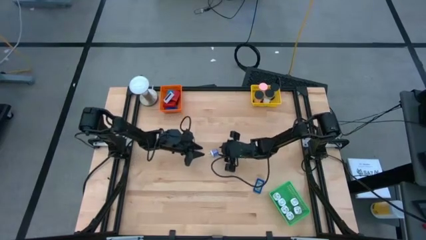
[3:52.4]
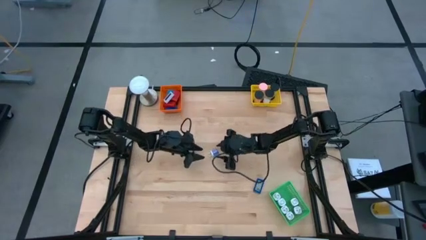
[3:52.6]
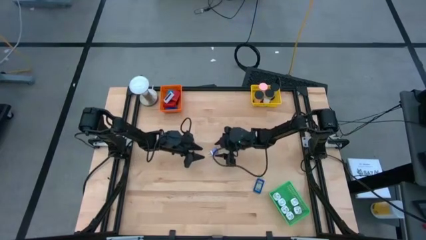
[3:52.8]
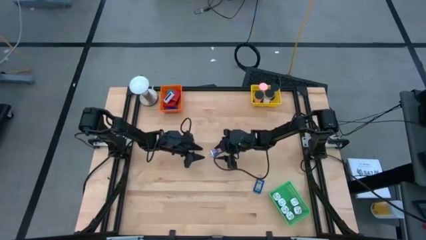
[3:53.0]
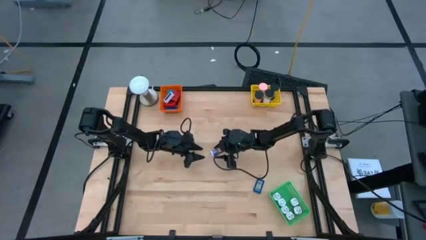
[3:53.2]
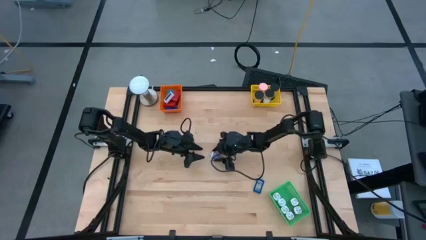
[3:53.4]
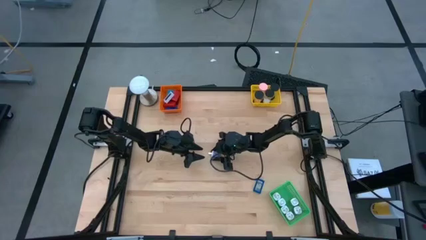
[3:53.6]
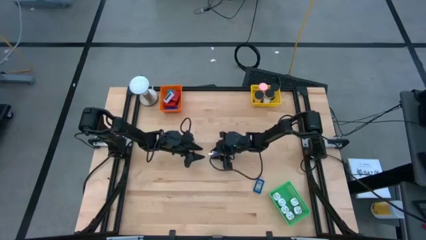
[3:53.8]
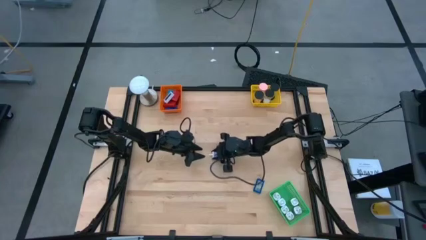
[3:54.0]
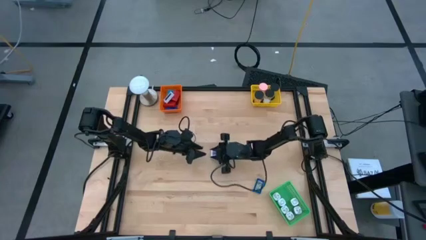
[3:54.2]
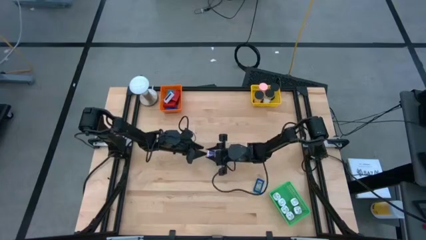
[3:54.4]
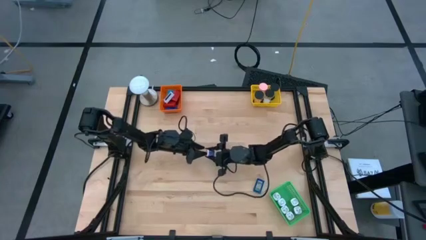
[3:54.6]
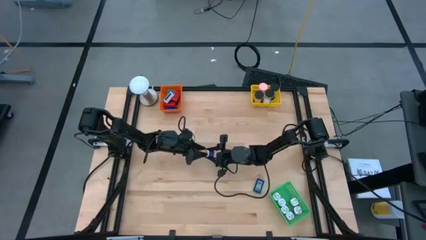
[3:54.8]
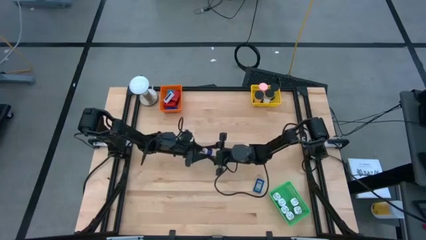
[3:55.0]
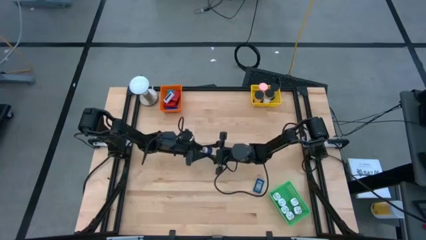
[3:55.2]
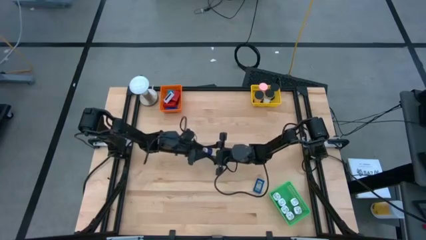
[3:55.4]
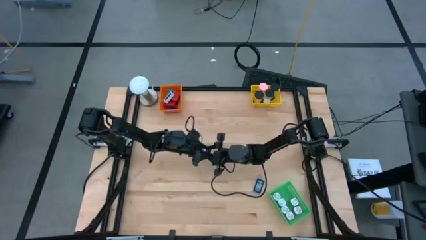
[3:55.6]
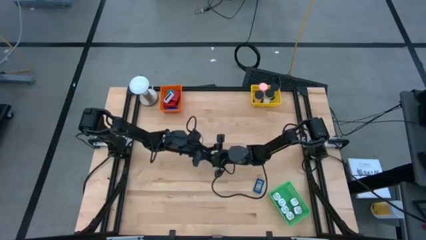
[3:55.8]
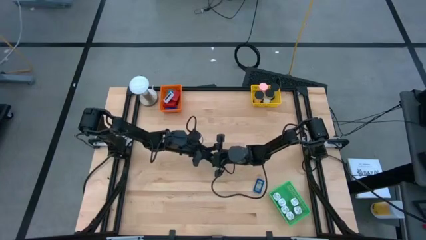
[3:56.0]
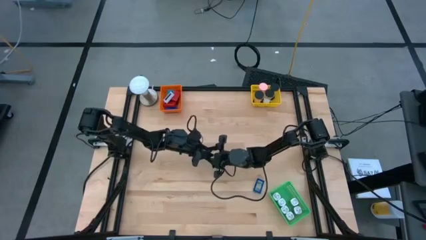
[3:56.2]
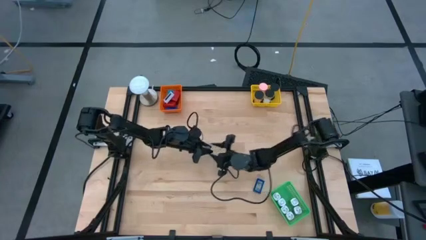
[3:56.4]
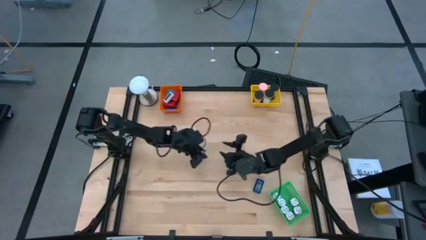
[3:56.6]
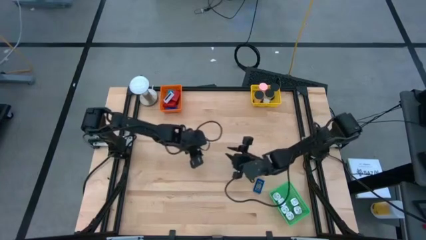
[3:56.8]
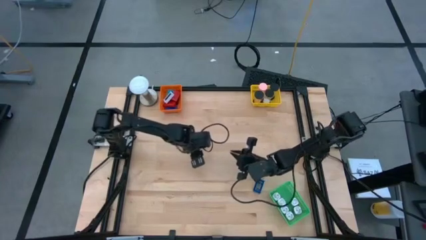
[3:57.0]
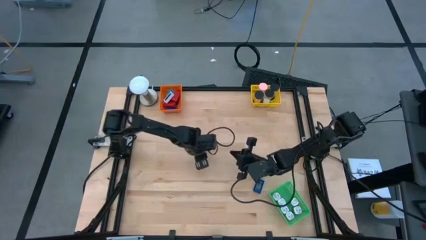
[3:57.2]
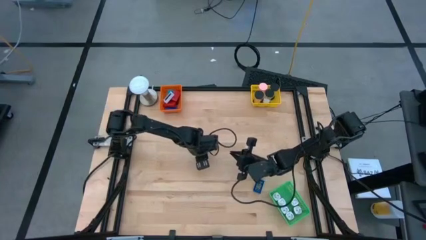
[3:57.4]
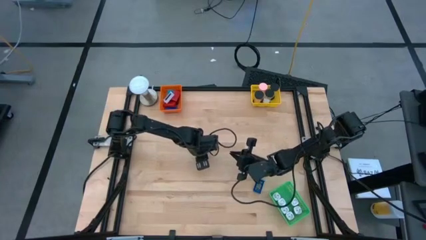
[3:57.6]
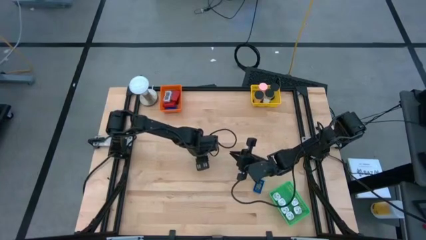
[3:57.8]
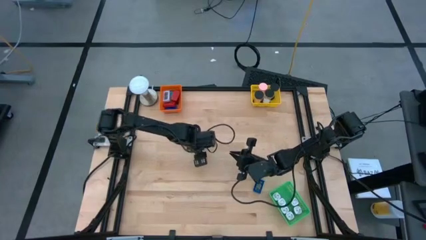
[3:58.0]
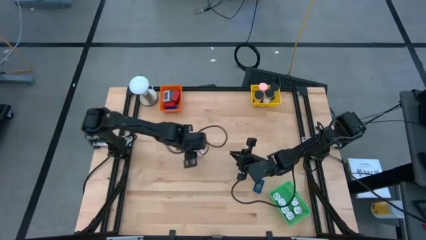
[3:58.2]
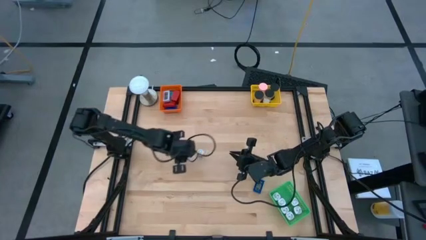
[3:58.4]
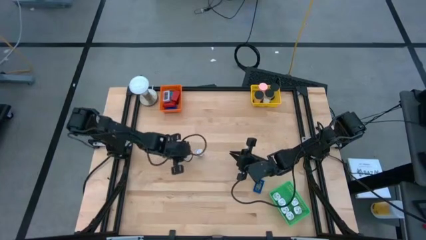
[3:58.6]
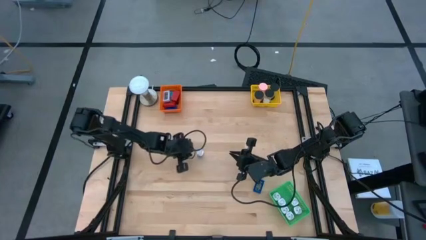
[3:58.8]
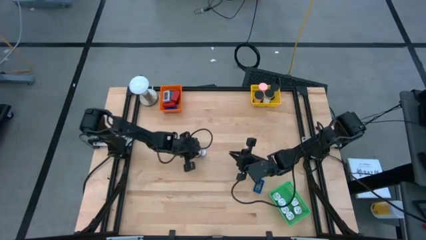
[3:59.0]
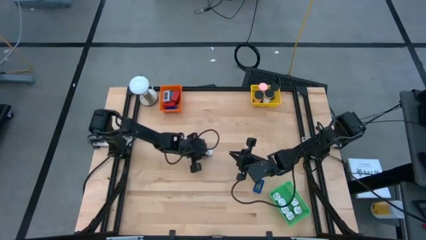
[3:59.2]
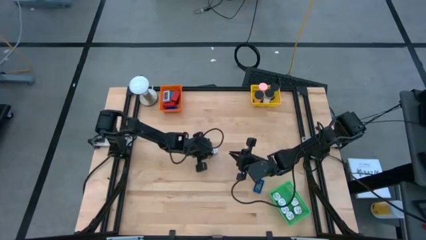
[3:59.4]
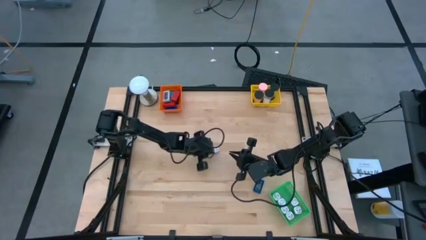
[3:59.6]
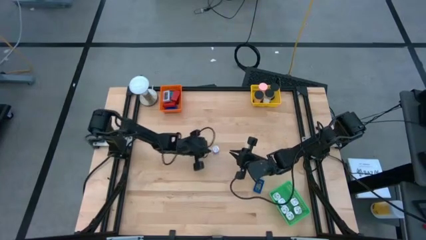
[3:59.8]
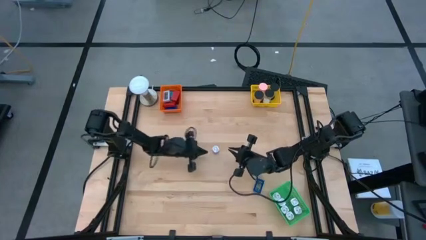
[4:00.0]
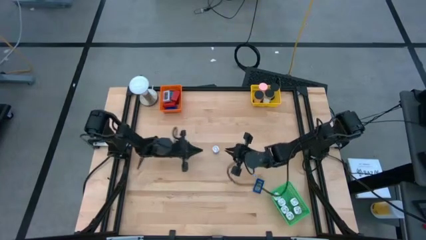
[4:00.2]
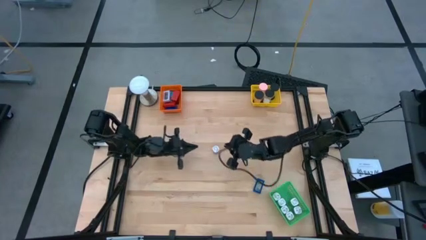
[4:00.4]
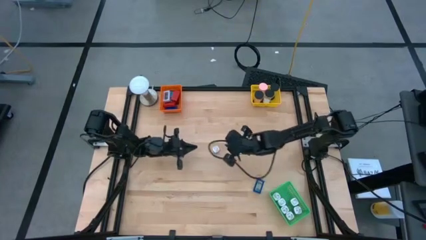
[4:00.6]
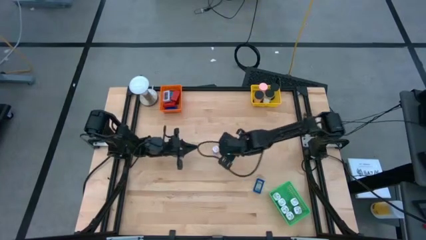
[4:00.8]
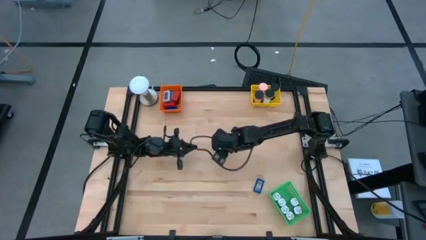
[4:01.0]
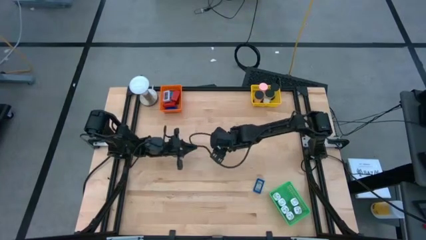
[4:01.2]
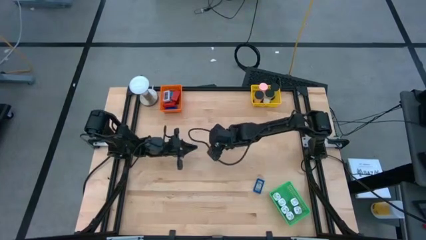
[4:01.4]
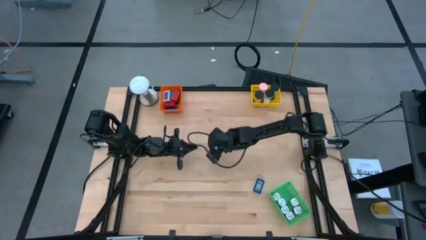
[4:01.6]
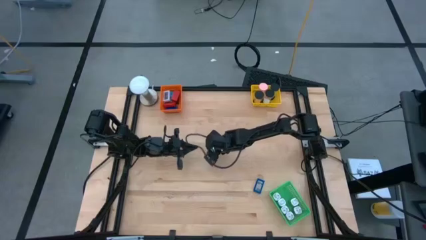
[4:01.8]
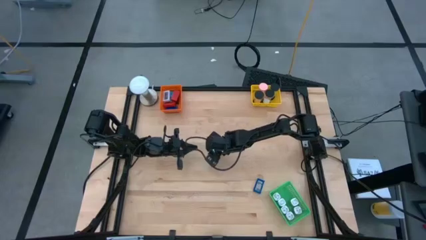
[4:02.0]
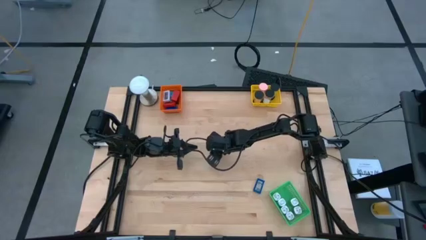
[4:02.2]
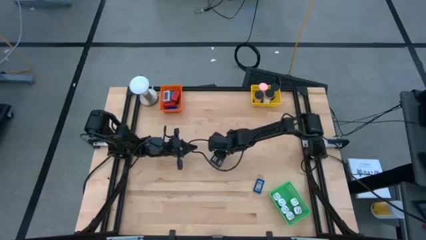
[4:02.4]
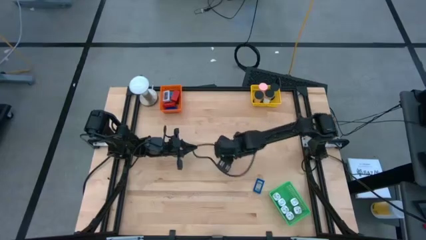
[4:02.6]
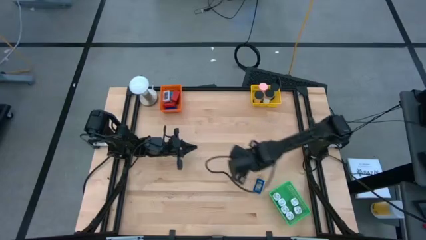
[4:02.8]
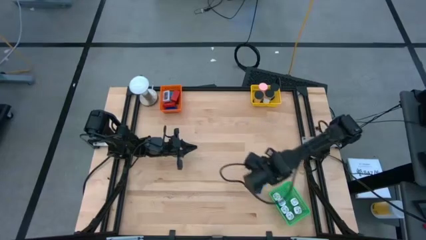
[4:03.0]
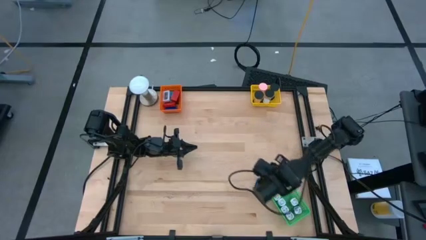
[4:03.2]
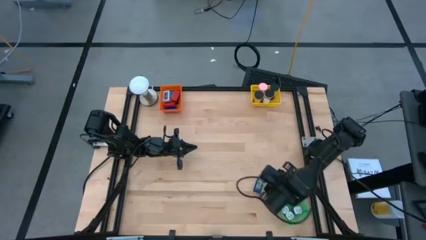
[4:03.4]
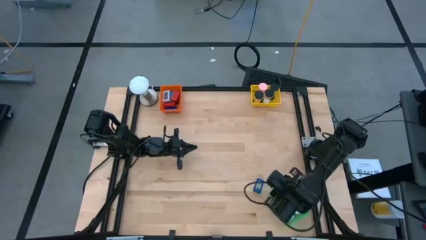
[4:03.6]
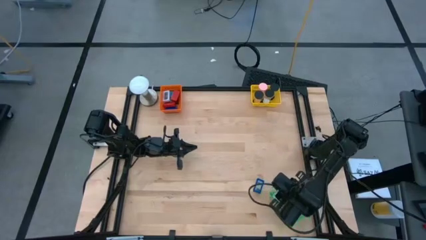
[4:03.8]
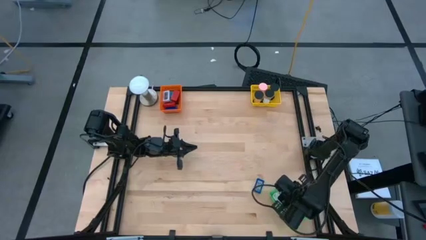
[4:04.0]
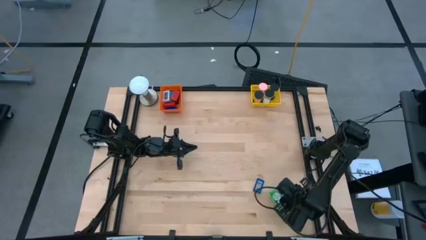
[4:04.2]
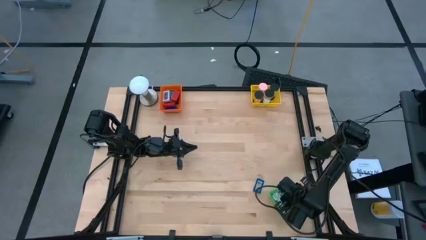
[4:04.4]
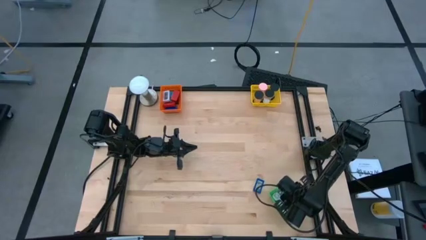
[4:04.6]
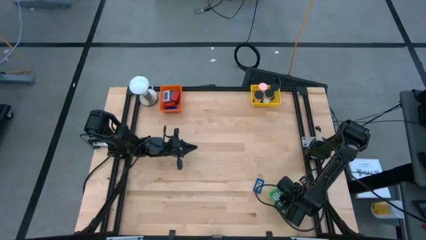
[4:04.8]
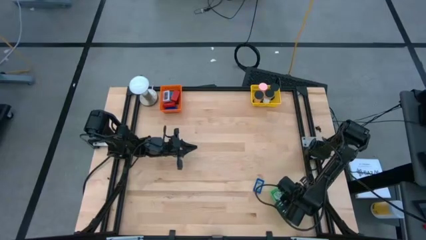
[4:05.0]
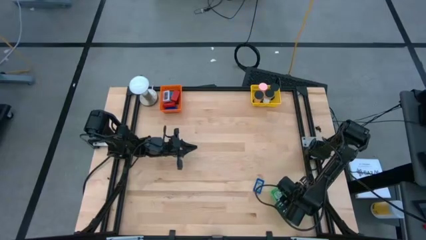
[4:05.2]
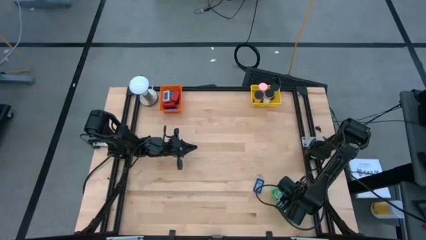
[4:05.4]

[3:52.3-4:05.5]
Task: Pick & Place Office items
Put the violet charger adapter into the green bin

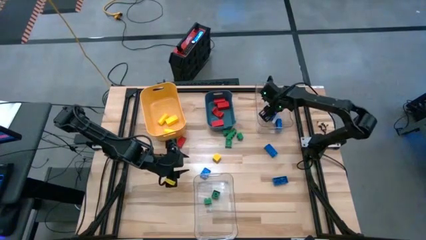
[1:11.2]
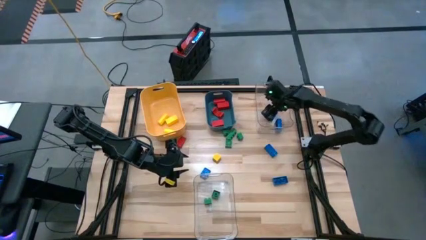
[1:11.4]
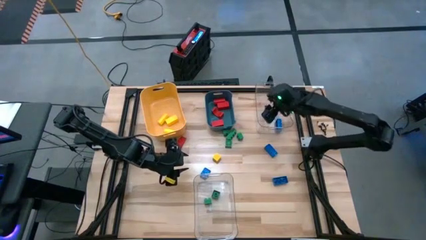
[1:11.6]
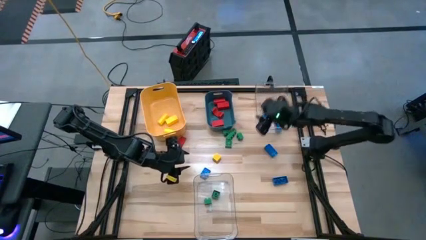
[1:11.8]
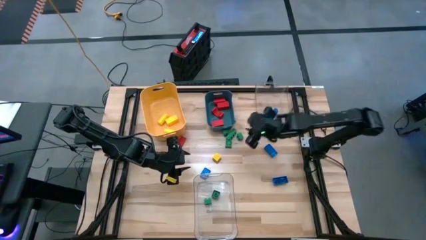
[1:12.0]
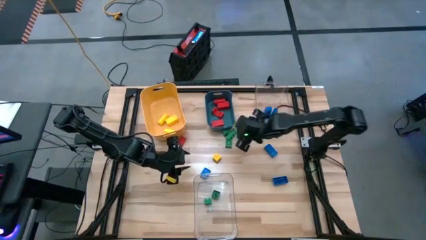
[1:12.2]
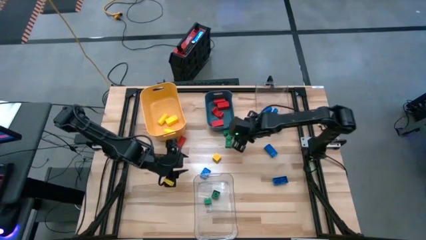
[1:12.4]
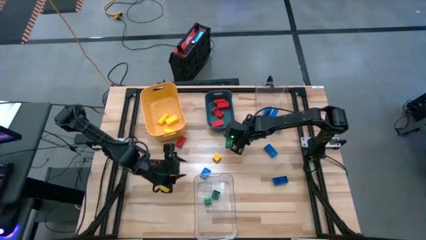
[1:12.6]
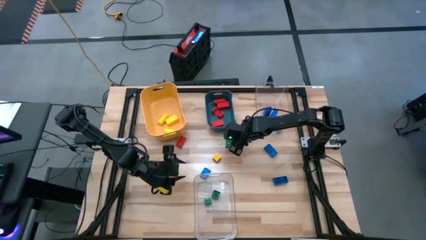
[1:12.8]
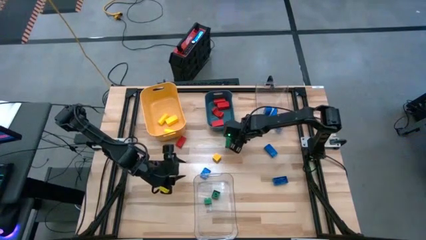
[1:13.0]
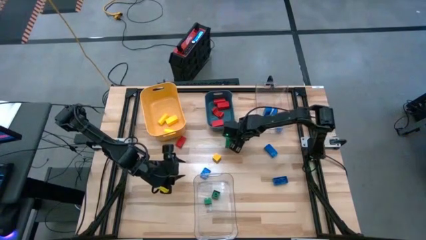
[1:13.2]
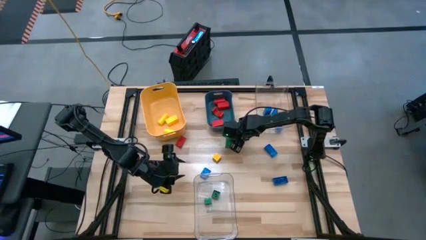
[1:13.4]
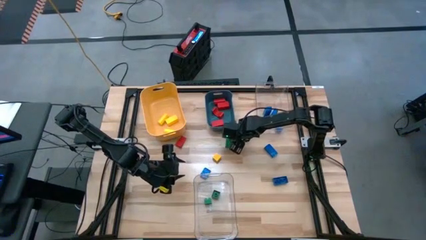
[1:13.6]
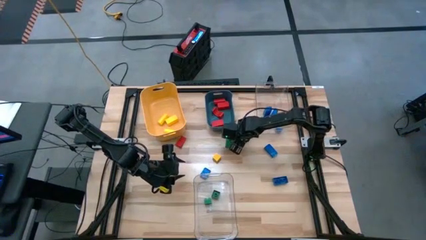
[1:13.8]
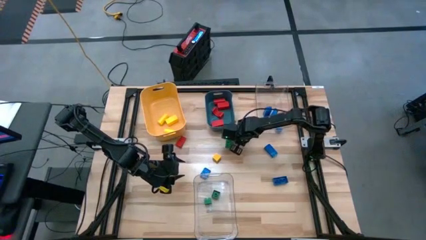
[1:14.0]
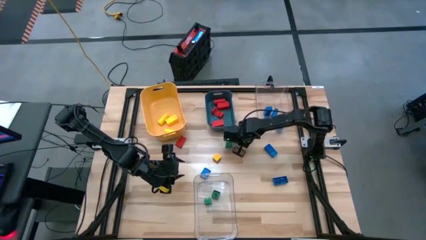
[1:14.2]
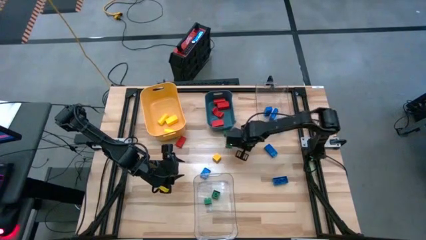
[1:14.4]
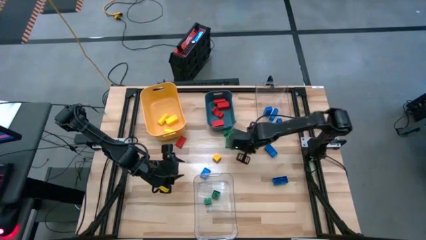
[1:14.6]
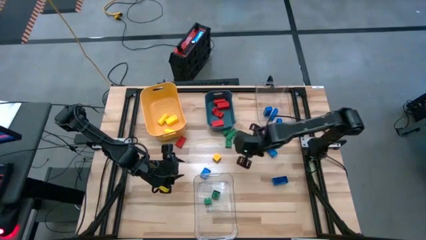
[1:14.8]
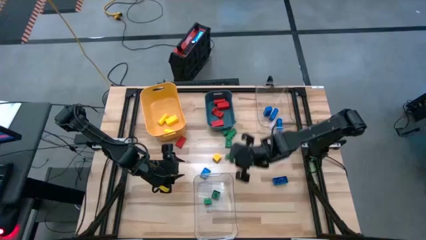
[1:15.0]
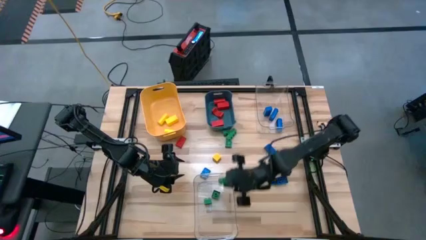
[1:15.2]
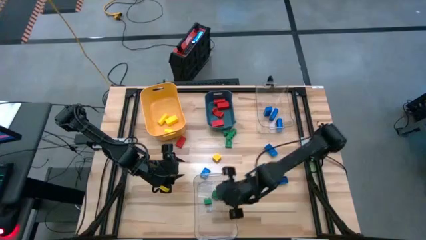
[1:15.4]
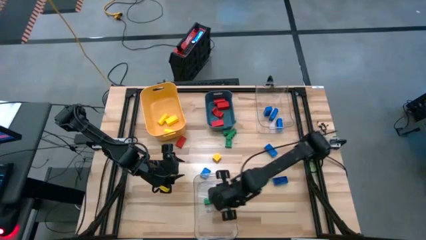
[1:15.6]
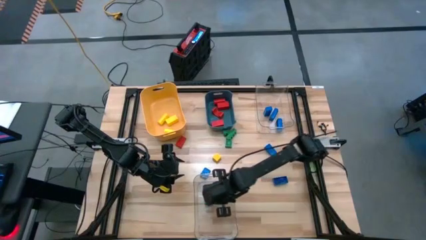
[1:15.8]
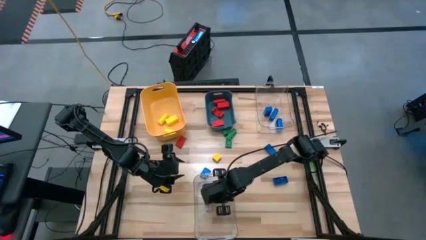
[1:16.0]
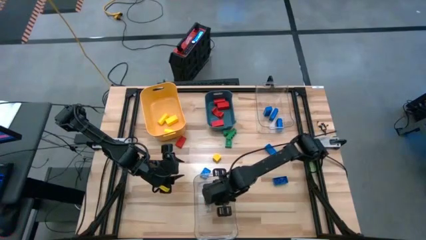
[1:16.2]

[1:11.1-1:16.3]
Task: Sort blocks
Put the green game piece into the bottom transparent bin
